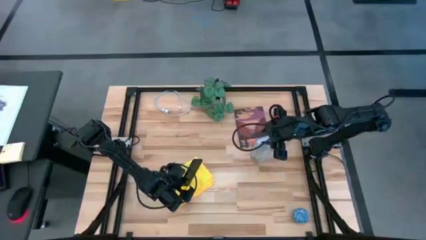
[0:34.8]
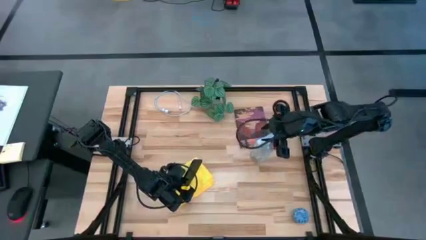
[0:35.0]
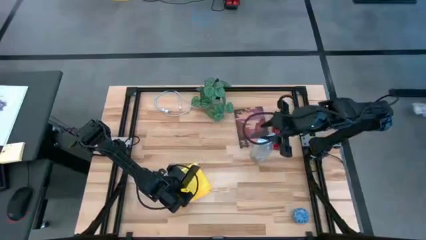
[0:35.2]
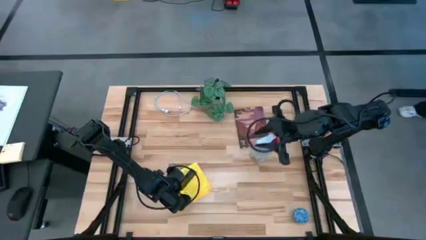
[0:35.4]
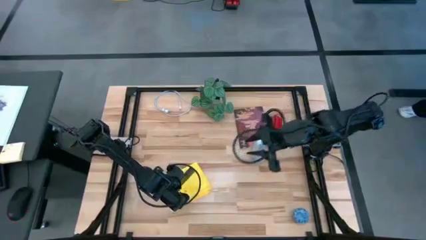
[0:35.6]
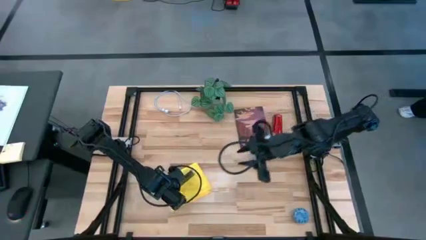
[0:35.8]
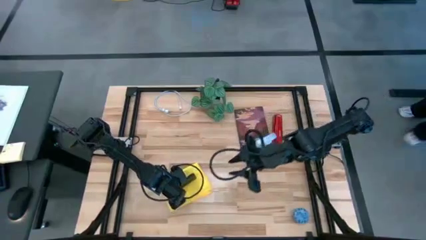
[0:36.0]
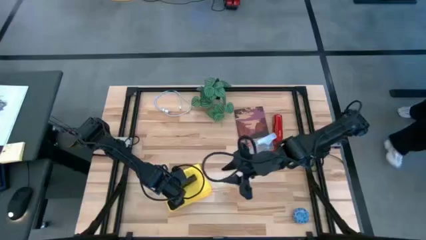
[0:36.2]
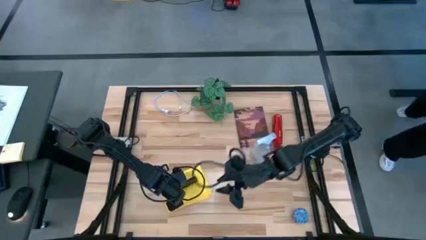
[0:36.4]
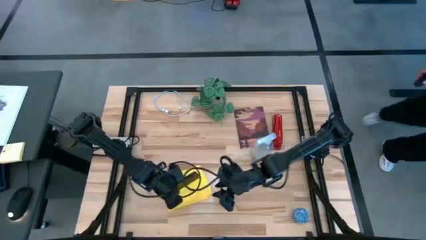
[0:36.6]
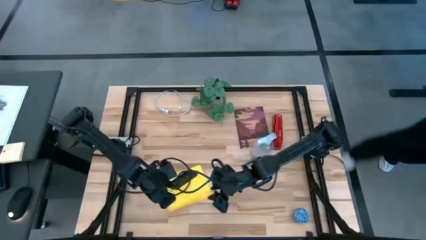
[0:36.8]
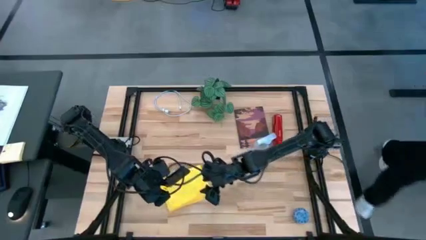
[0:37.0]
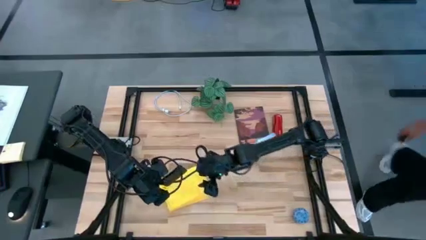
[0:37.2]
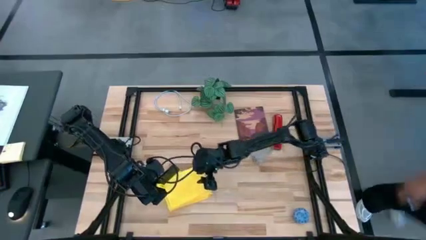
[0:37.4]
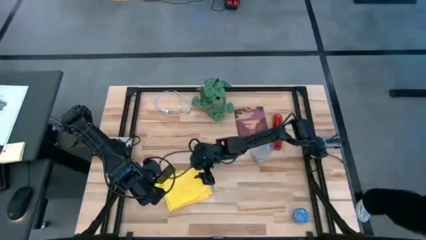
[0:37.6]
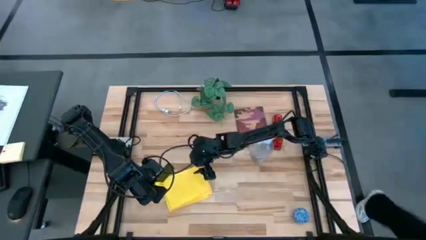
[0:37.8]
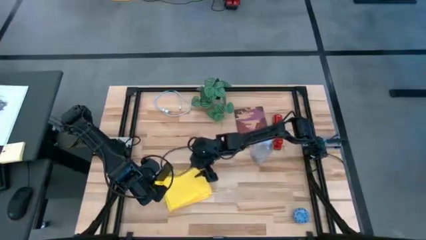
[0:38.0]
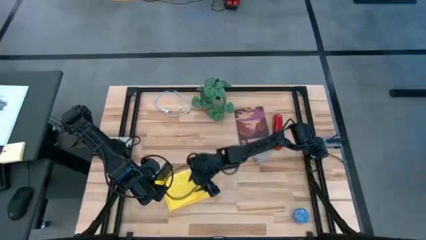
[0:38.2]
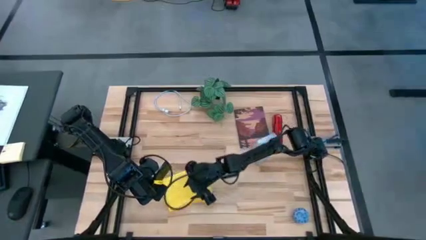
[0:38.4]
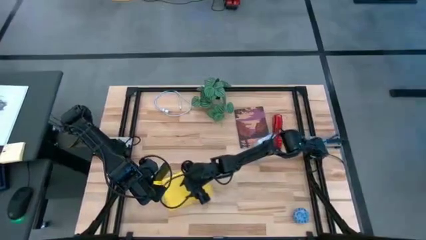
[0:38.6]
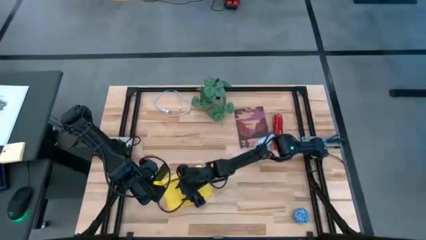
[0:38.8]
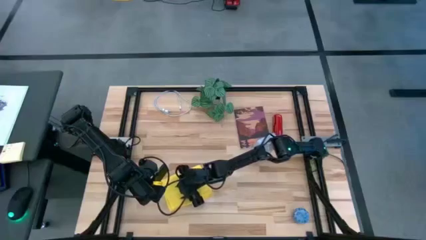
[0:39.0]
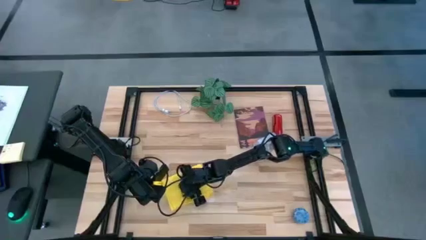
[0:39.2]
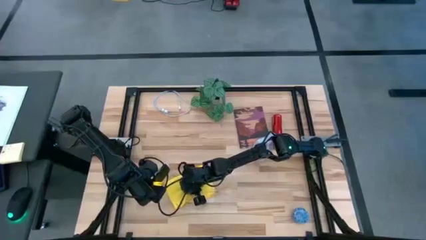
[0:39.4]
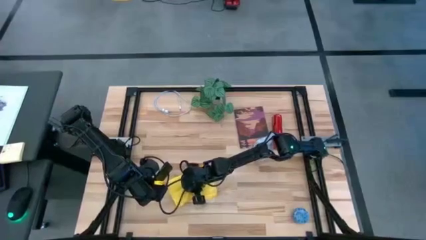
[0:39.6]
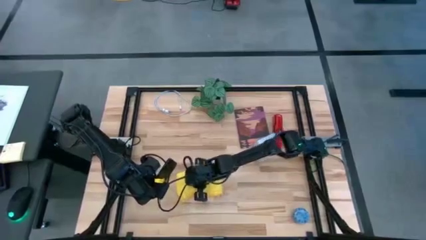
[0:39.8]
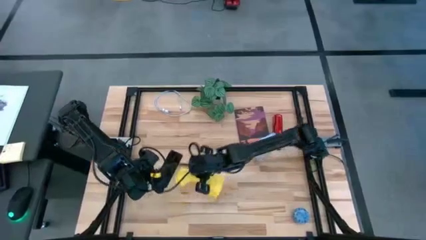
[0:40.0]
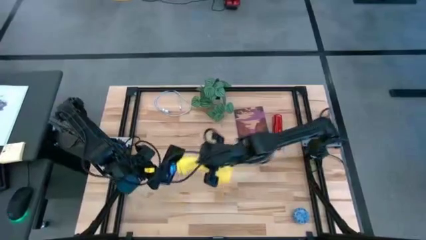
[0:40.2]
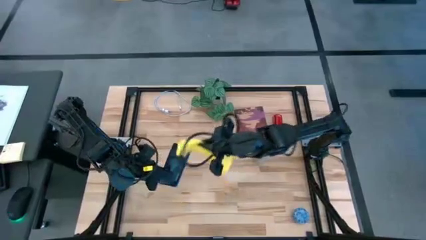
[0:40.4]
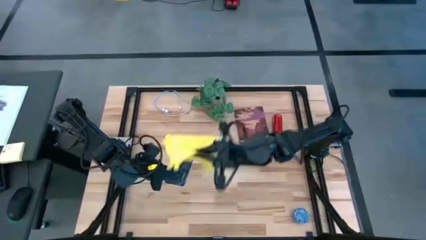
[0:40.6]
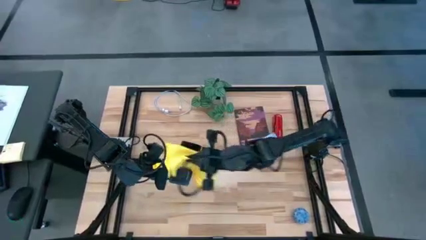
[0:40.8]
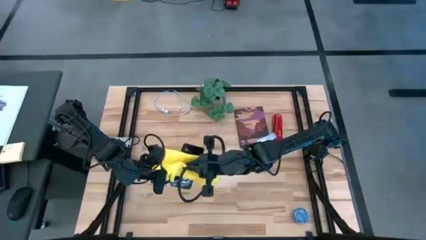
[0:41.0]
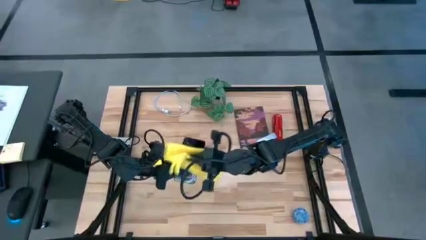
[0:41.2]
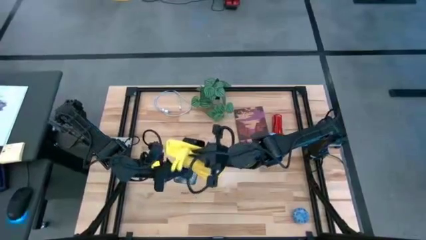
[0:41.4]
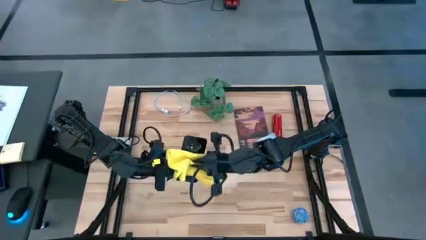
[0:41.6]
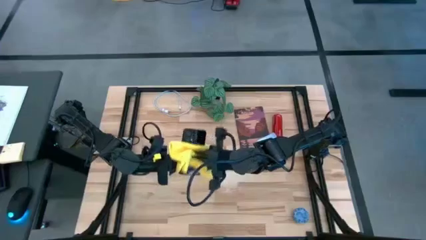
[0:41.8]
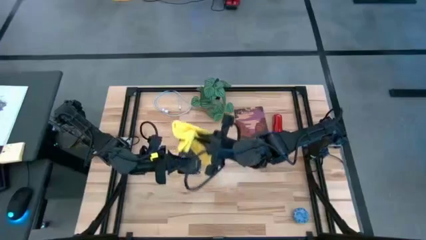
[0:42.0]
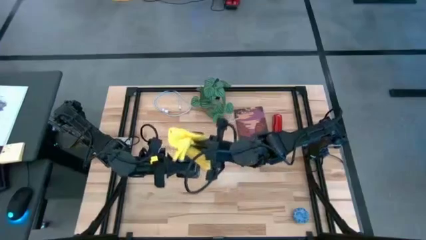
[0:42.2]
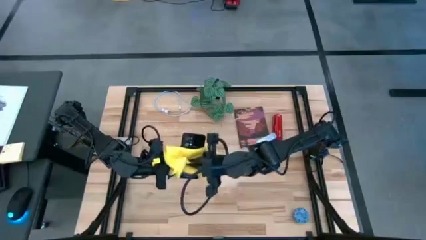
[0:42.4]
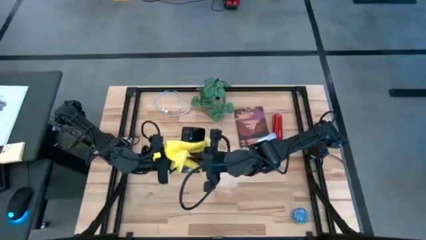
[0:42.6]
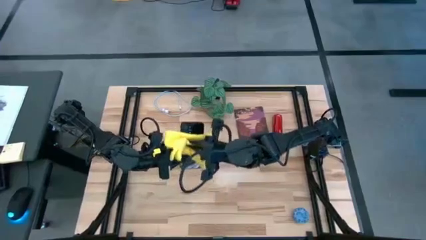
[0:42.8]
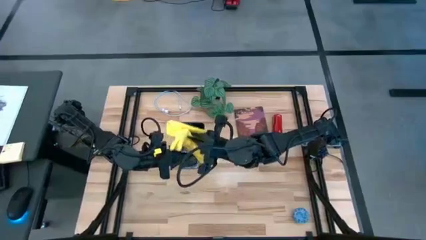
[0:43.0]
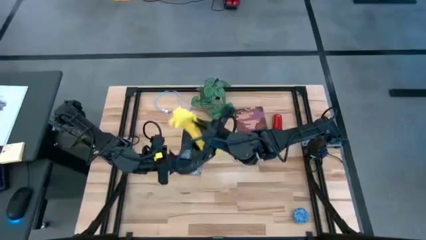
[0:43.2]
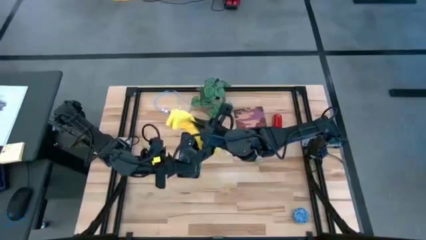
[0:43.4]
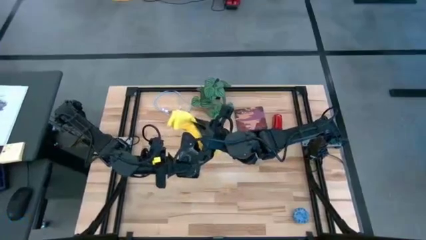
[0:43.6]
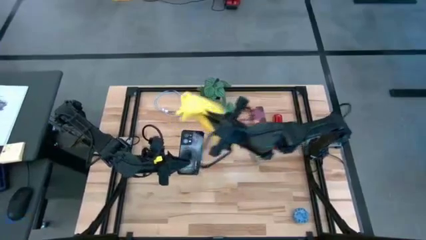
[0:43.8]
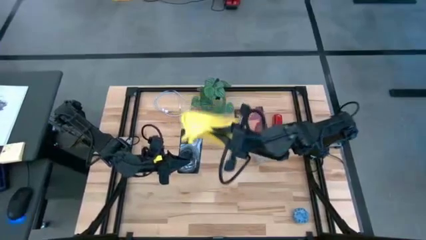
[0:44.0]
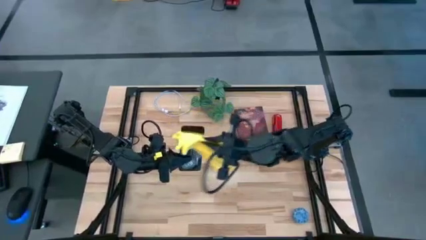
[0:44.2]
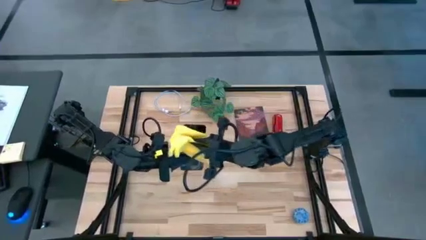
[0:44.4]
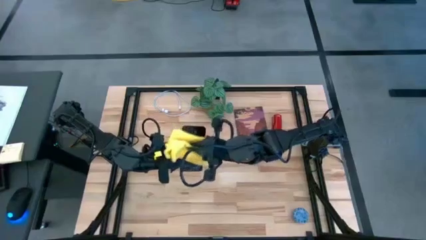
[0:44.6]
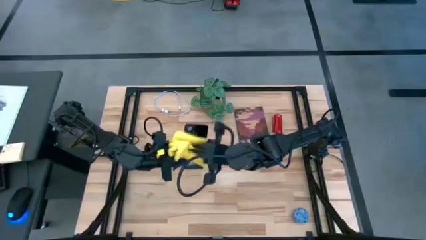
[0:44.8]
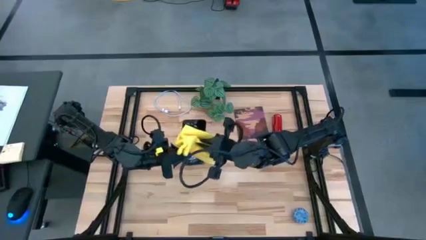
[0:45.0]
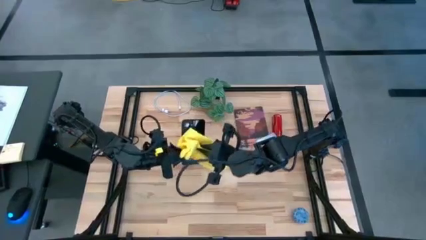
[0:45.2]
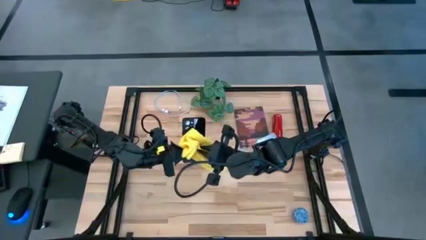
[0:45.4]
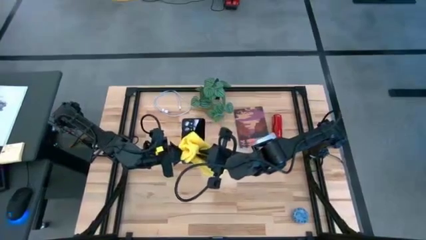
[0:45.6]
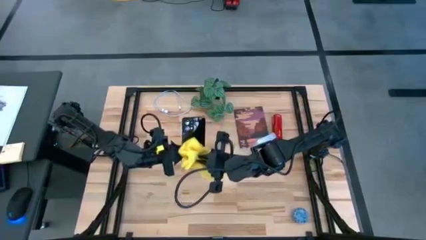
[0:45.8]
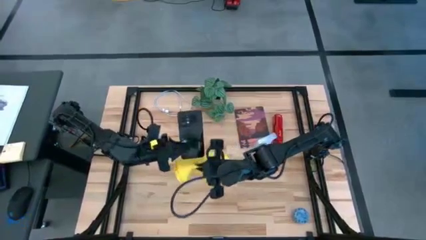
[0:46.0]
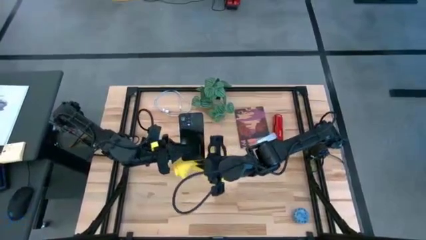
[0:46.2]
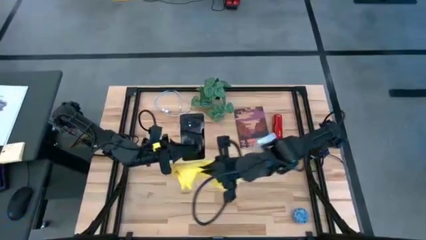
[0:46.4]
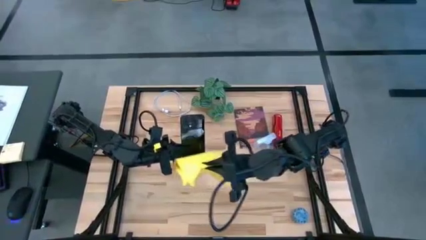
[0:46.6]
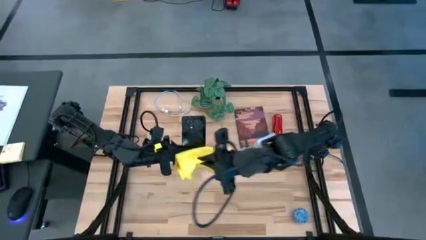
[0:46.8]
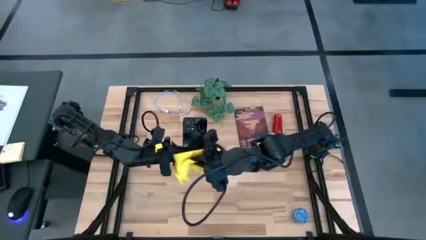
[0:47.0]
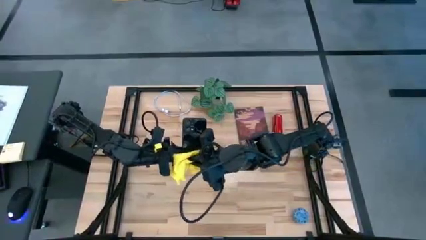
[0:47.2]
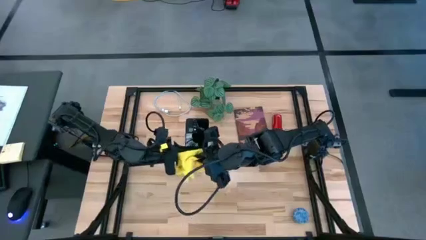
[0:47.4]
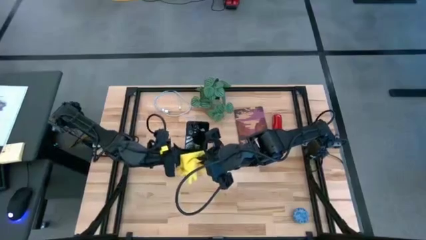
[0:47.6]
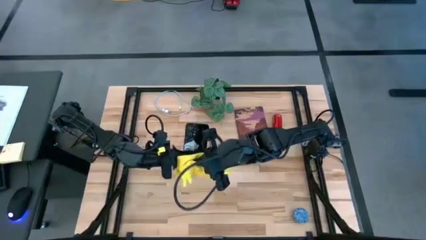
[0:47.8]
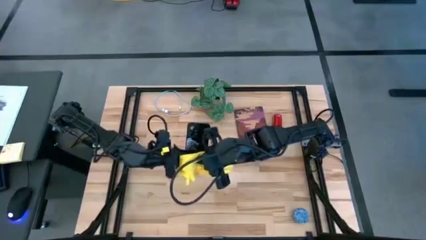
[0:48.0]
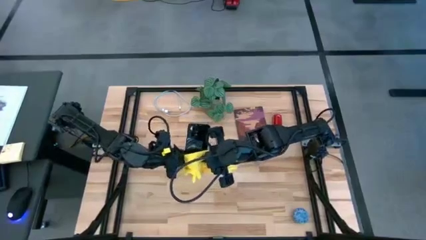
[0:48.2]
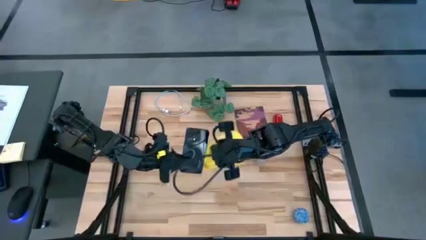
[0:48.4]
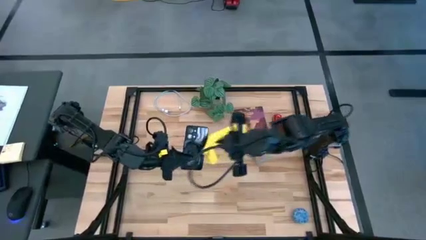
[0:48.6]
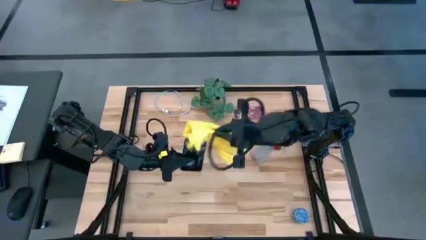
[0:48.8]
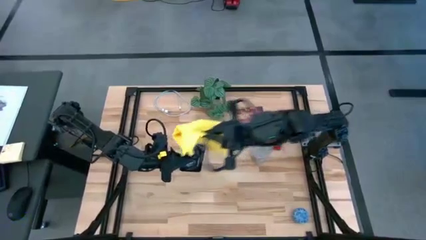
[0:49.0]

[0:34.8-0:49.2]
Task: Apply microfiber cloth
Wipe the back of the cellphone with the yellow microfiber cloth

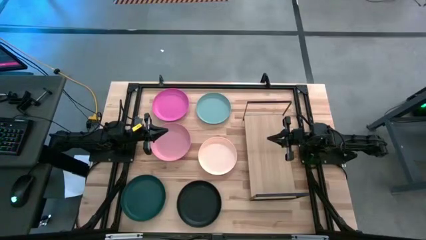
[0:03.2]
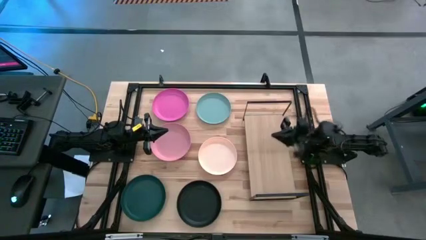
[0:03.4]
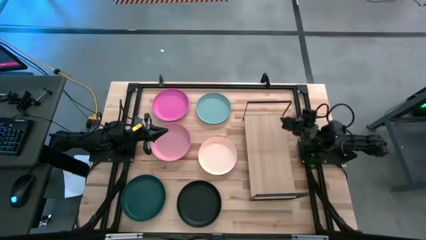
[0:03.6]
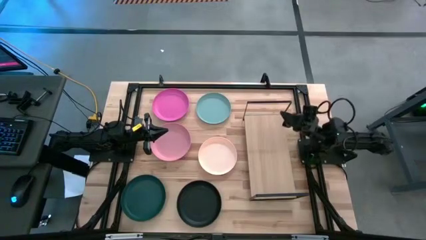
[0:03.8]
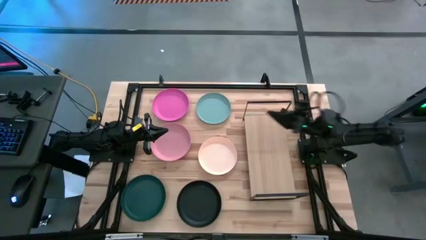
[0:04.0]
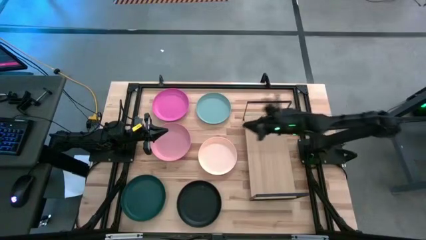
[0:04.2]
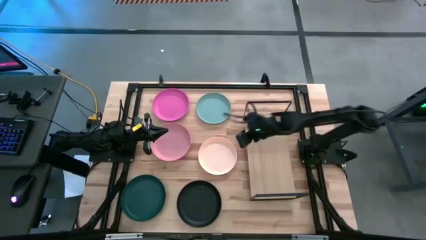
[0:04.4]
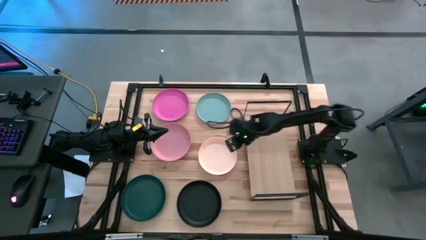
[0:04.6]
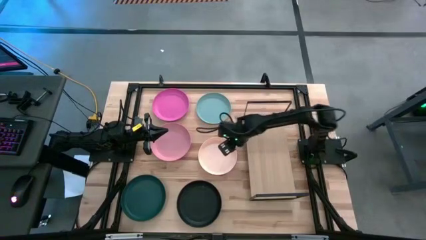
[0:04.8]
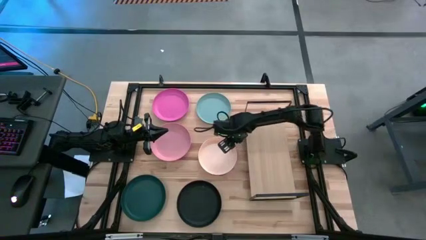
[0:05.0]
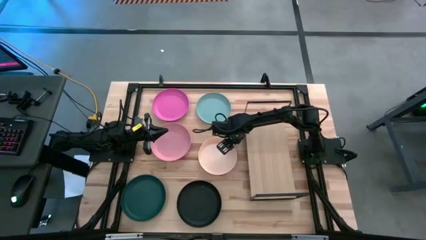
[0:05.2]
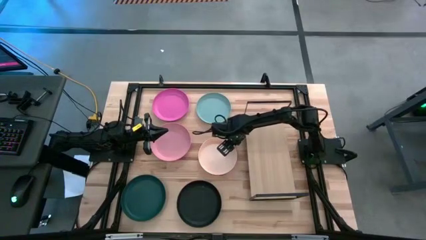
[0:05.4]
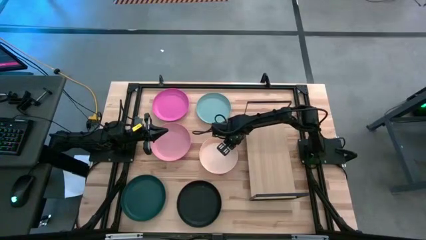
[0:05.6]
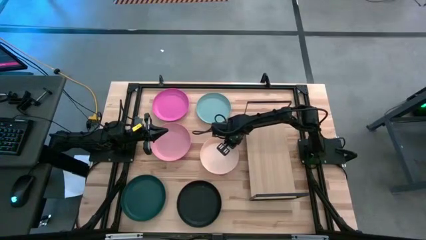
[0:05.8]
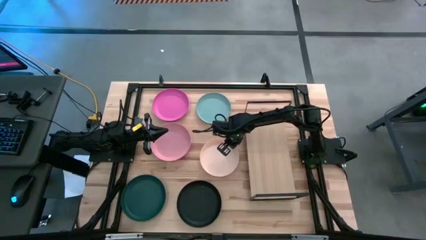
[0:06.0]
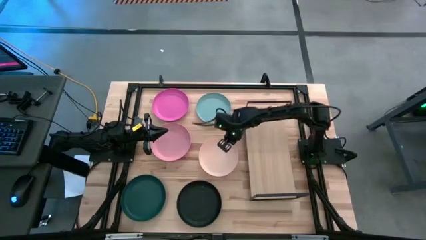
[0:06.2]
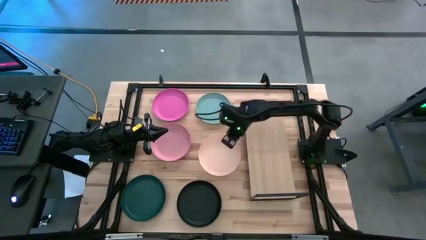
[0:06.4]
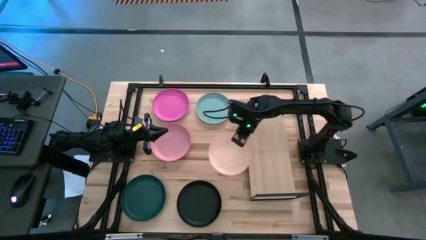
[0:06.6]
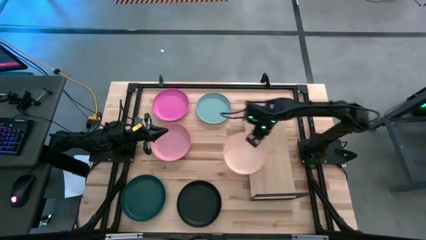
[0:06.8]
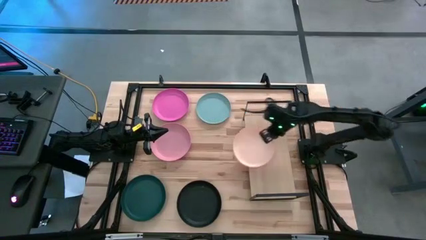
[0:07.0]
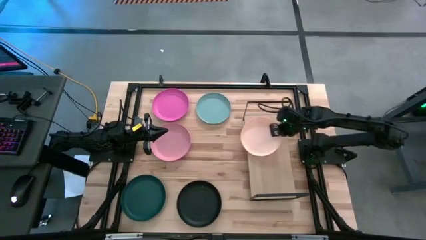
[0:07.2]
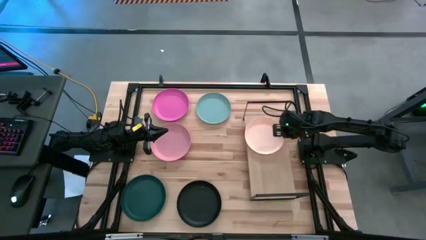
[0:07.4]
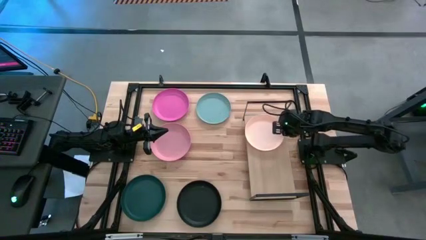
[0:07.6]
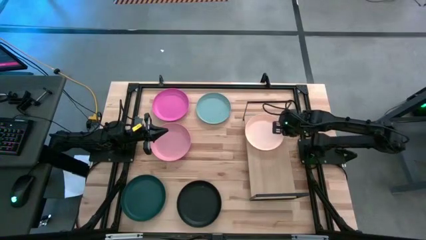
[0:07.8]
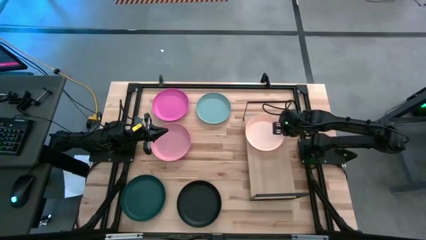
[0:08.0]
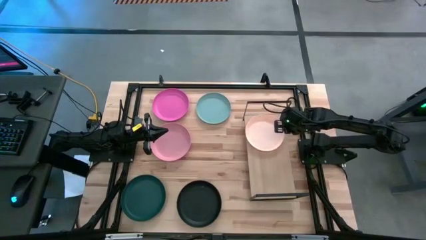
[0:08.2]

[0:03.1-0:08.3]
Task: Place and stack plates onto a shelf
Put the light orange plate on the shelf
